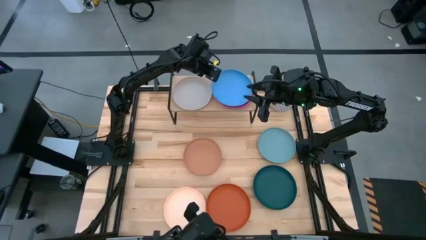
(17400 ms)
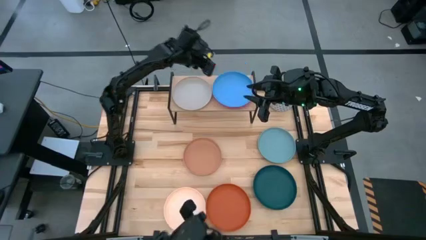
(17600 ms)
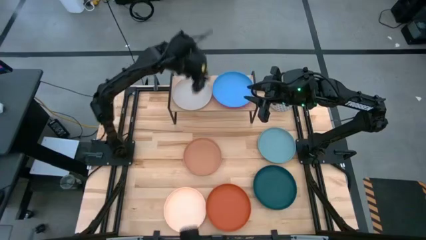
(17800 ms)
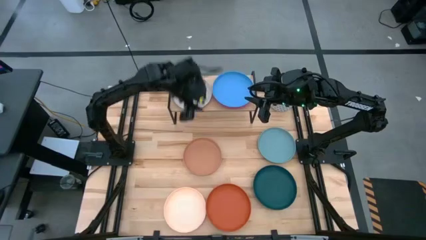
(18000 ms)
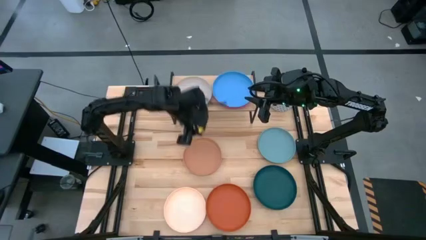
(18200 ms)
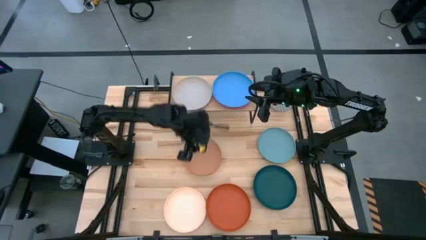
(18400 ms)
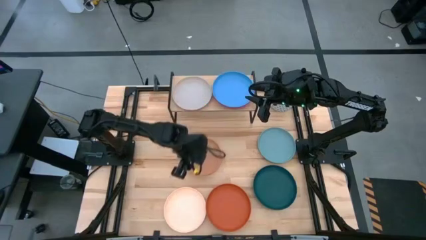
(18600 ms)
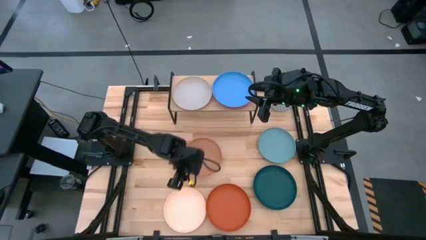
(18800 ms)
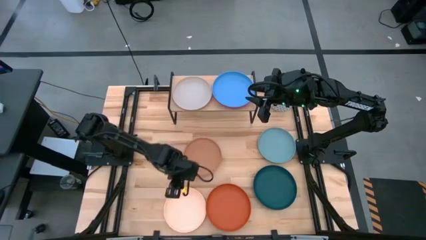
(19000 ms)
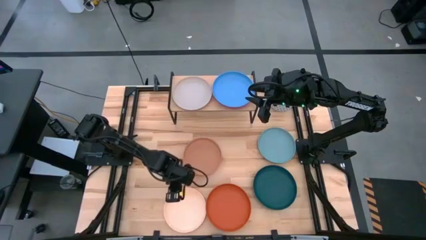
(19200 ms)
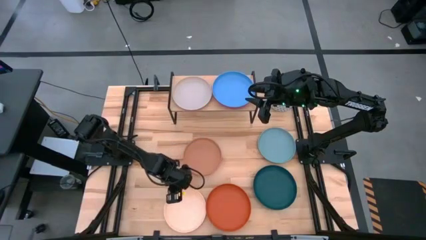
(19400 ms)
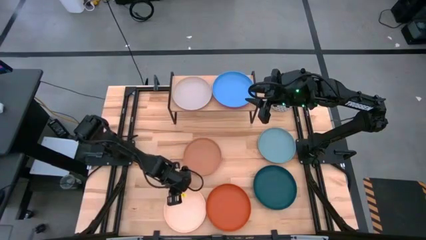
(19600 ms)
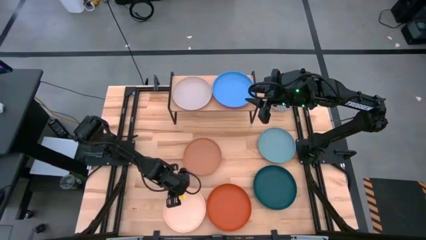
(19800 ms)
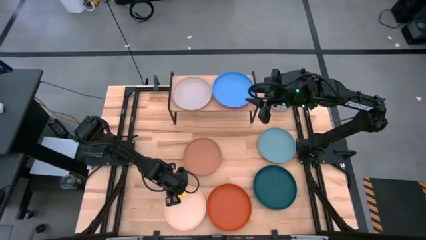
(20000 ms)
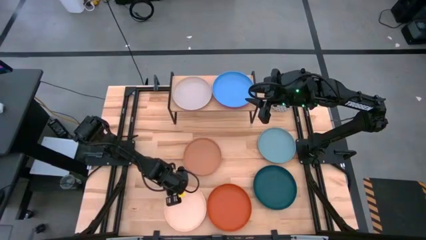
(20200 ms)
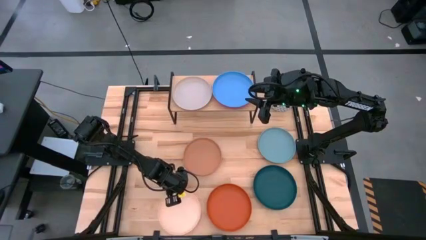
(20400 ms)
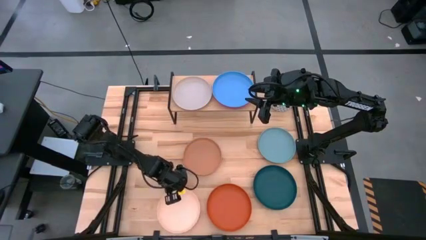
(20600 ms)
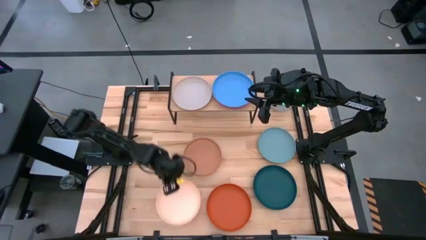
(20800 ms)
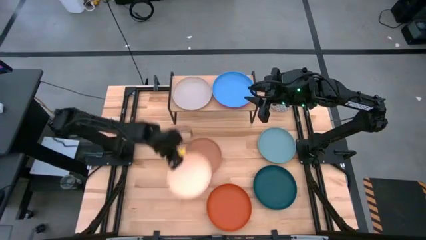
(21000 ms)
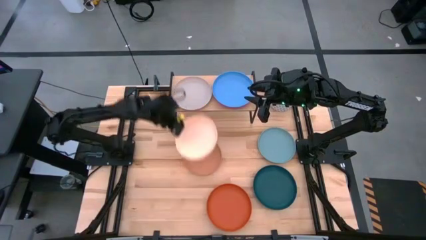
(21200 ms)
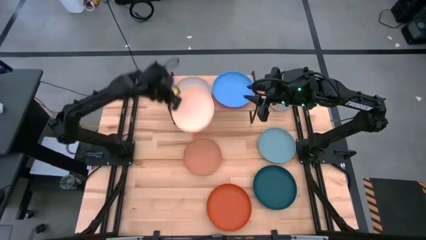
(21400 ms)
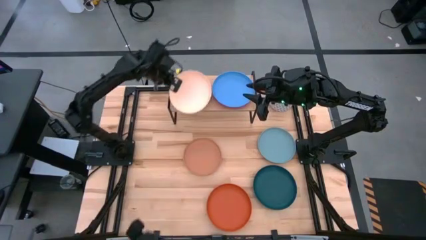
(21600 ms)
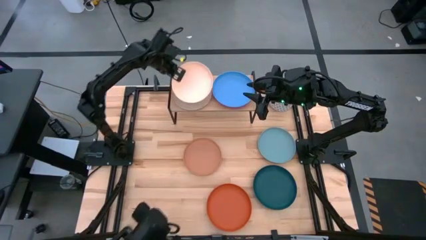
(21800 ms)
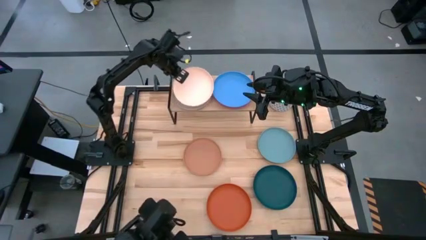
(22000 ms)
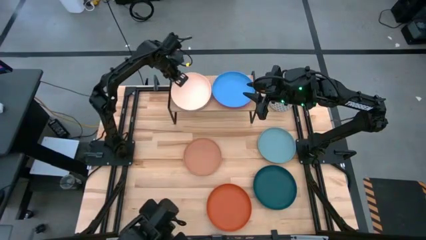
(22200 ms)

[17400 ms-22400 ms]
Task: Place and stack plates onto a shelf
Stack the light pink plate on the gray plate on the shelf

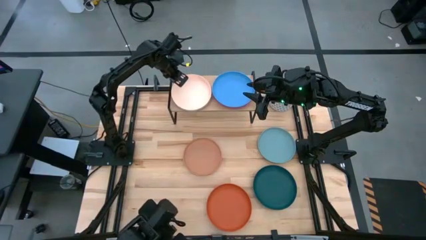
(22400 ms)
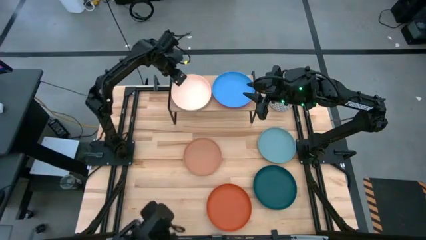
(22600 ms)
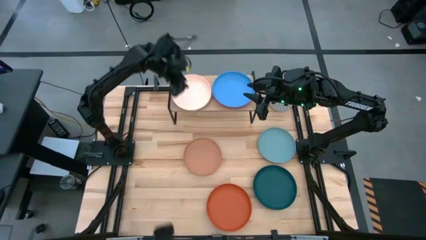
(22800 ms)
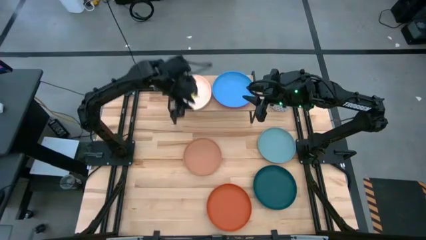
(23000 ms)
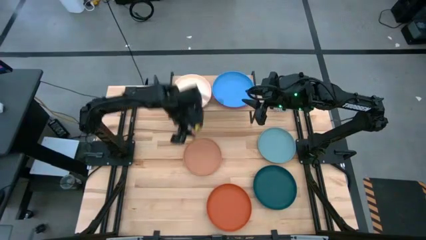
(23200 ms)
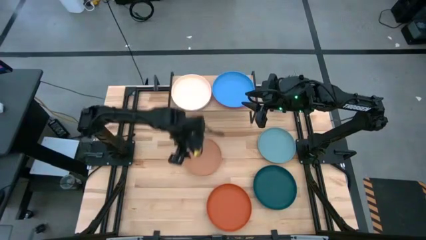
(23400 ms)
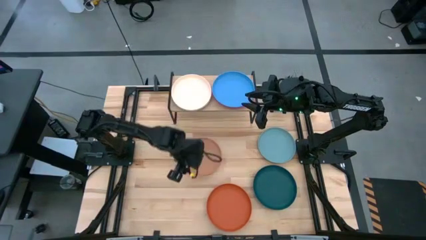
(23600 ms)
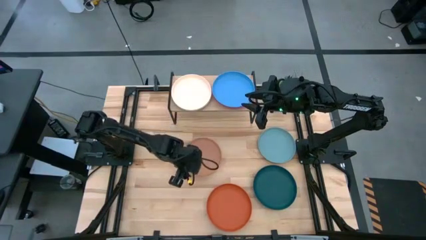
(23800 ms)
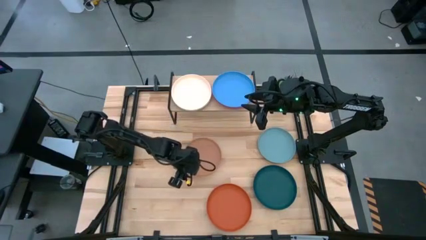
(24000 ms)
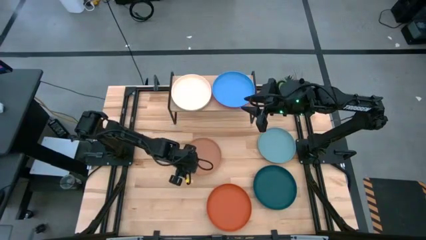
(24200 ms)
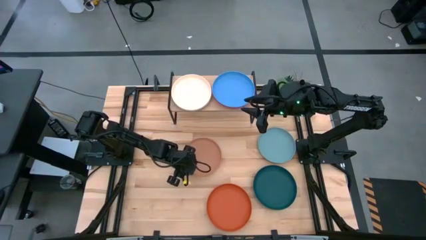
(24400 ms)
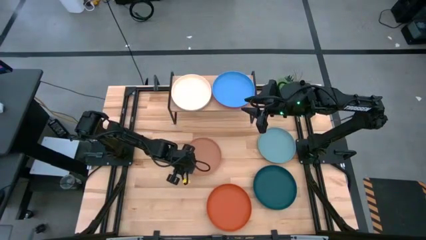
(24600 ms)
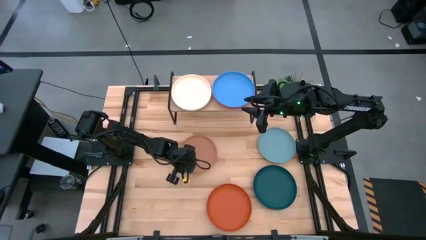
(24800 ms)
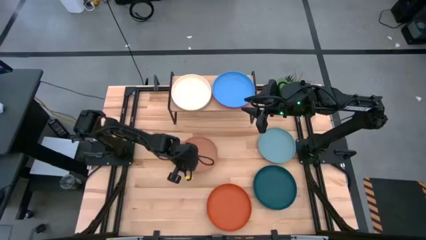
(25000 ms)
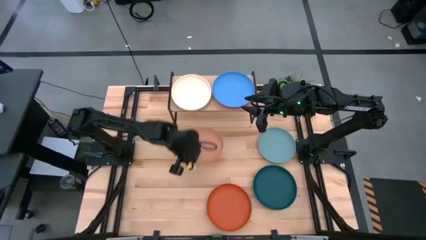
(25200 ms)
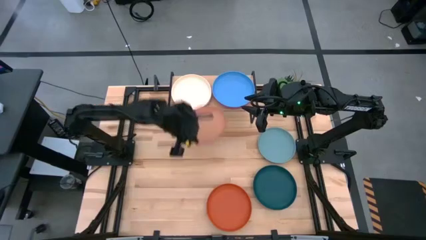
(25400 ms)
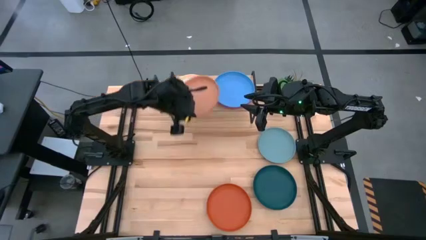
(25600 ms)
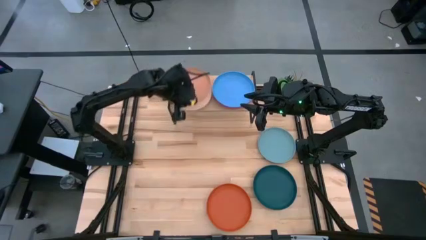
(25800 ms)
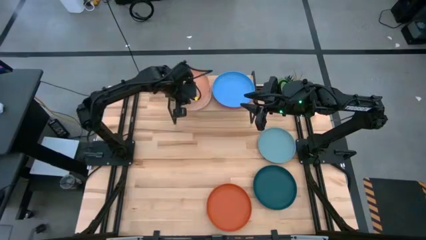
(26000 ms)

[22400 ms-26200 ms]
Stack the brown plate on the light pink plate on the shelf

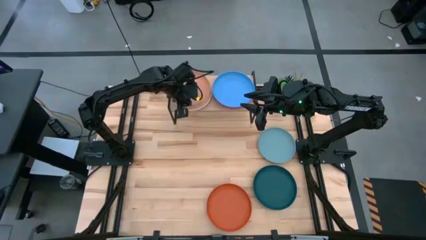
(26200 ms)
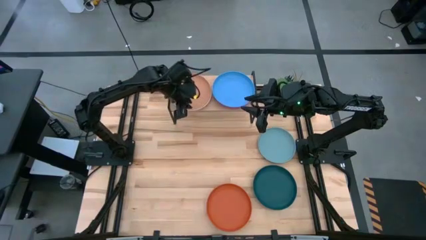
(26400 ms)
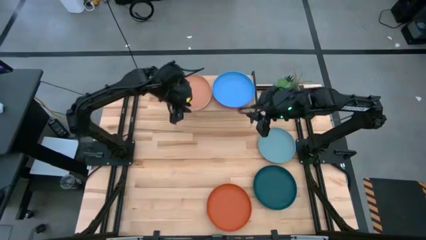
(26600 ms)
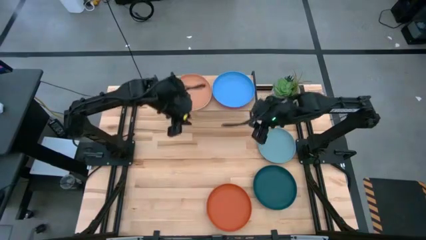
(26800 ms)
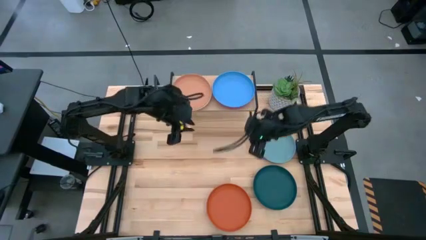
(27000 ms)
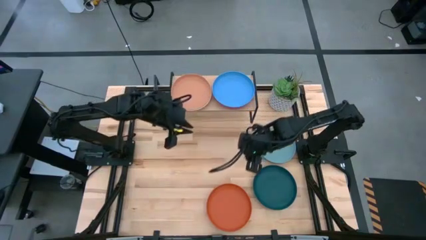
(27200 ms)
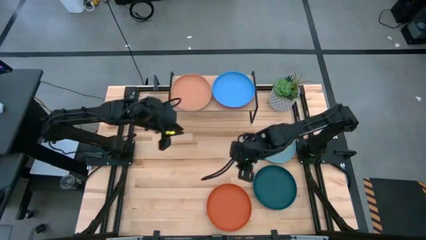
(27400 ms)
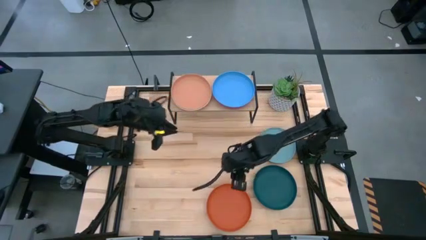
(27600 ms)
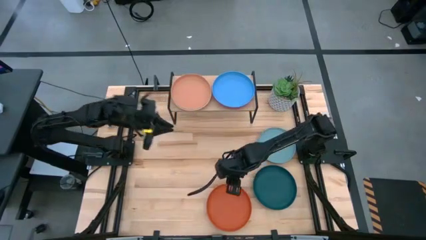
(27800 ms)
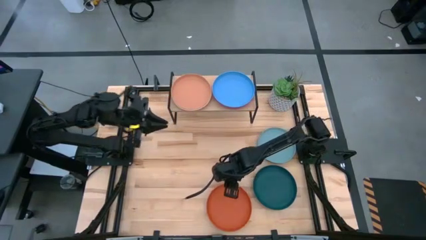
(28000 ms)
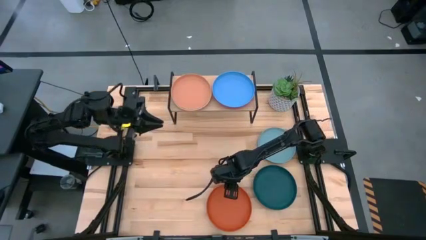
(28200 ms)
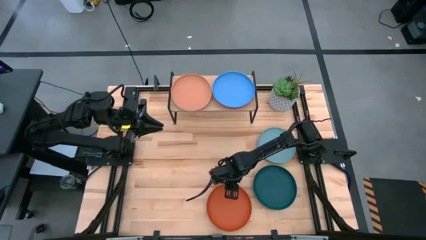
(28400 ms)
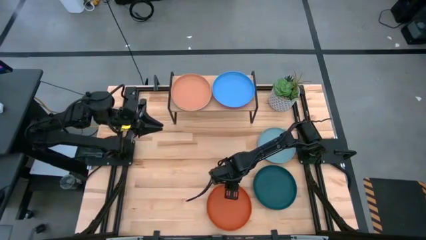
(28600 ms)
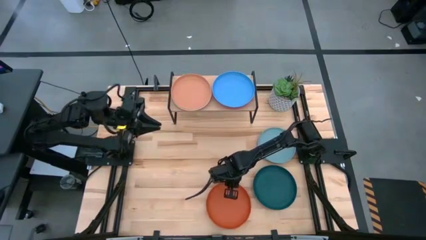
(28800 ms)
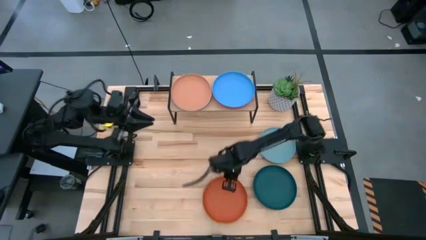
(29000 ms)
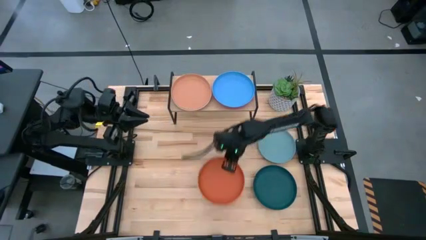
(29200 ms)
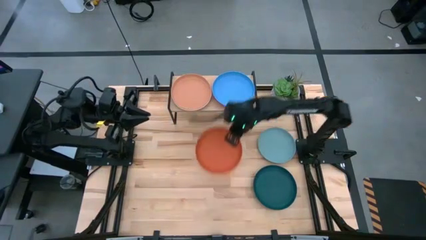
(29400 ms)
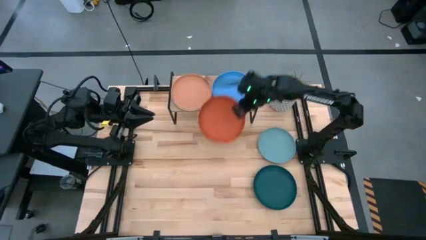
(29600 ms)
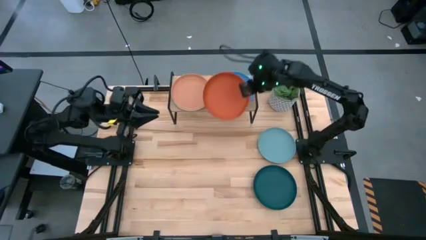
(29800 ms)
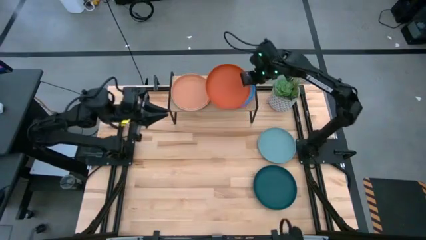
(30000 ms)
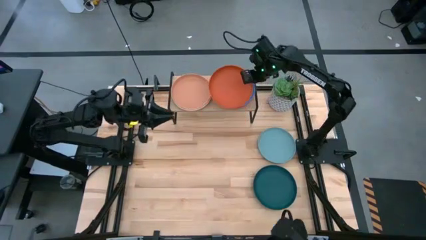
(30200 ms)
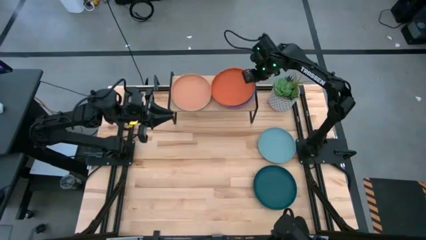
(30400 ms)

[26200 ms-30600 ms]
Stack the orange plate on the blue plate on the shelf

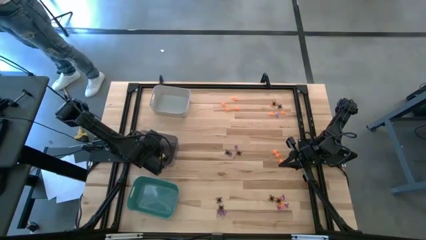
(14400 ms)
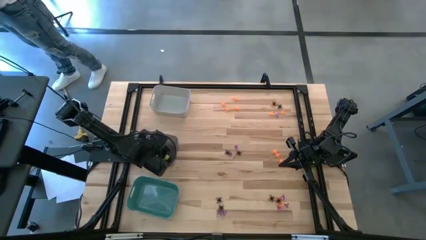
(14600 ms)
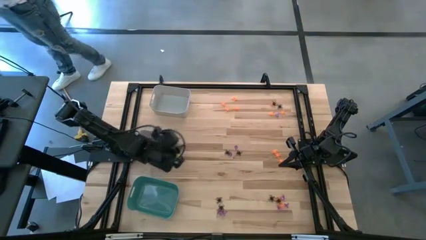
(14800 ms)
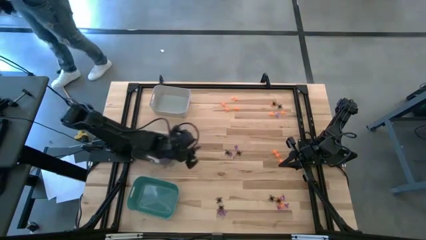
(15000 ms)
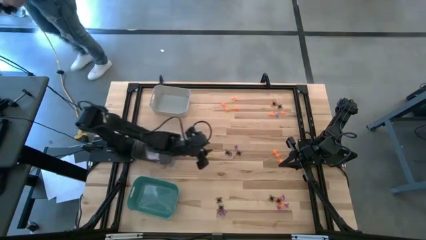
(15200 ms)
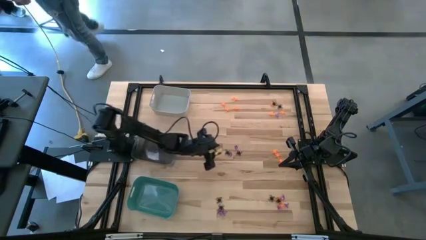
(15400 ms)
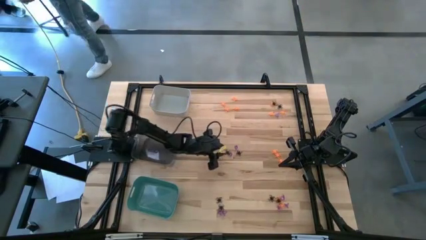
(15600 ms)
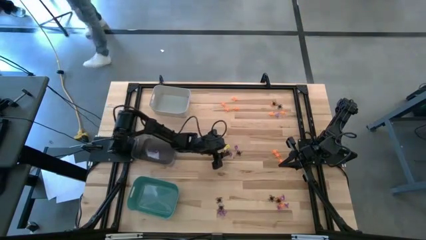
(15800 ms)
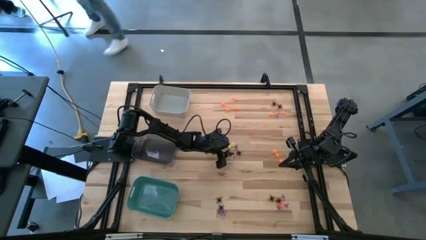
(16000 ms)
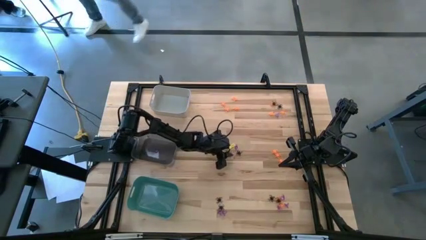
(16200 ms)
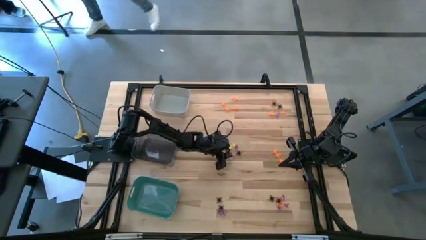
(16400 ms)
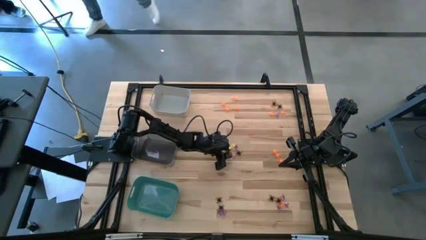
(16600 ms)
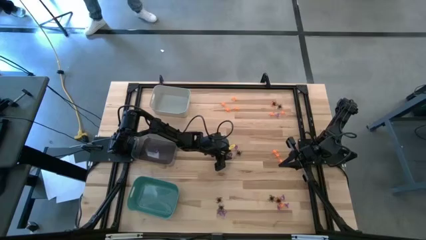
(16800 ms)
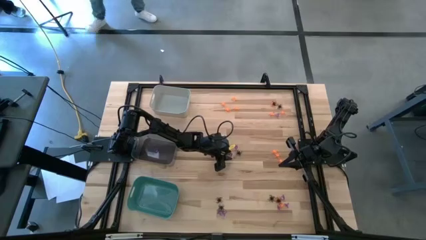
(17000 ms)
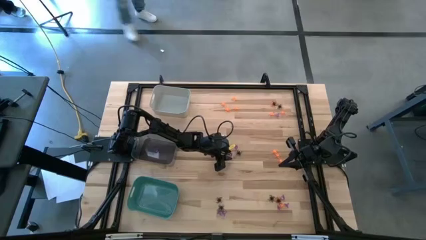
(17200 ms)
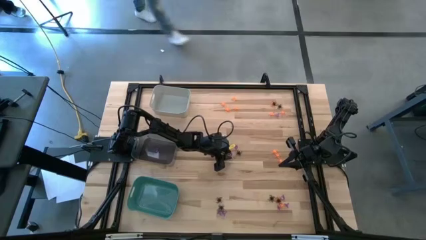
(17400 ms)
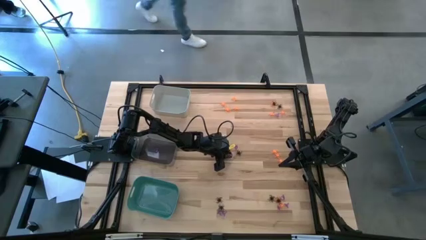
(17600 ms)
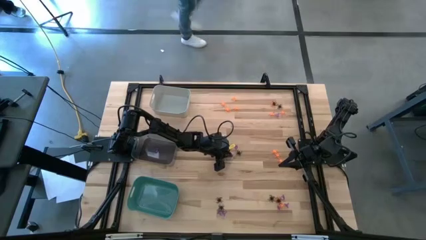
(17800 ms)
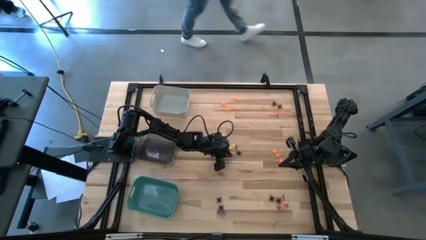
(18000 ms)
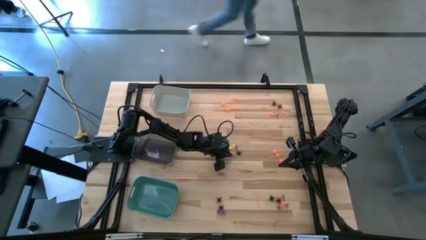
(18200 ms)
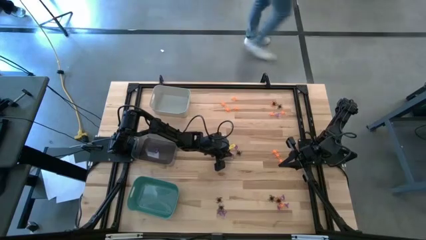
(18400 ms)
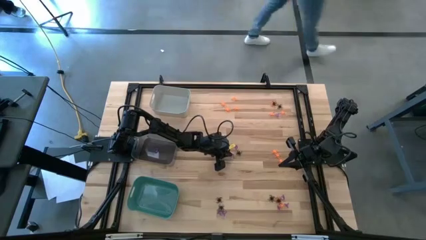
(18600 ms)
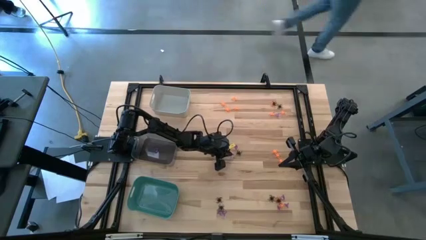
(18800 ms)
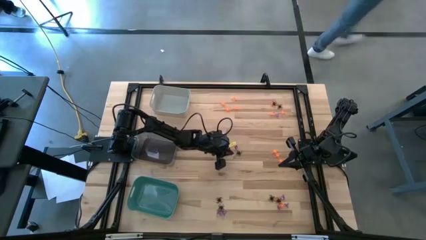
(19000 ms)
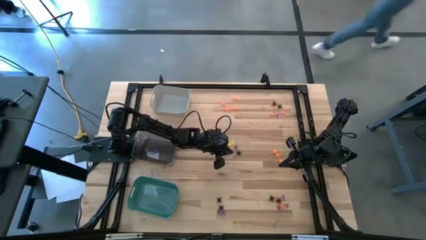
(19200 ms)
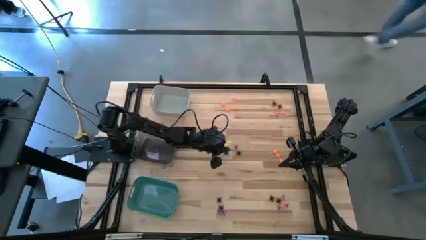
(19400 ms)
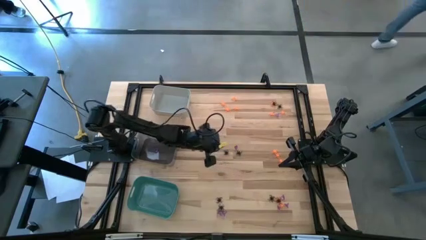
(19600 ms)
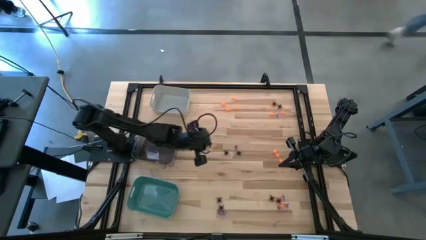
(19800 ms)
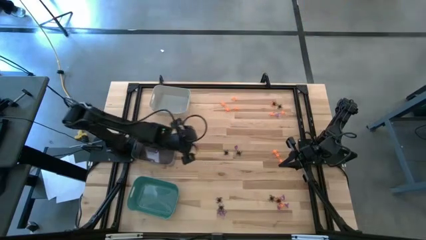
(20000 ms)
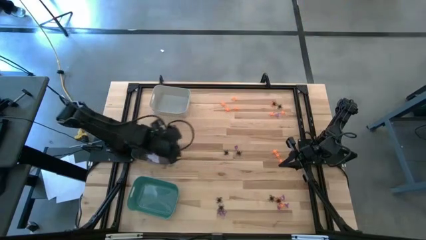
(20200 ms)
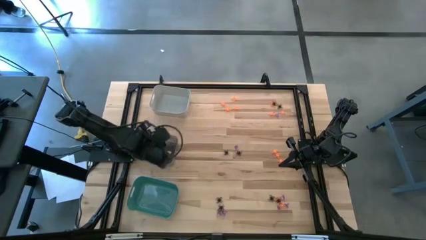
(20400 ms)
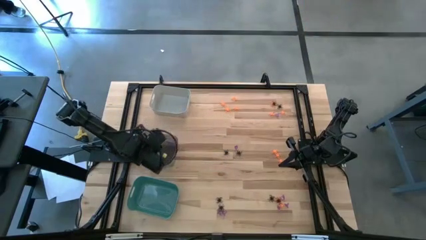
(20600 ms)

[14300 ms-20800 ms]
Task: Sort Halloween decoration
Put the center violet witch hat into the black bin
